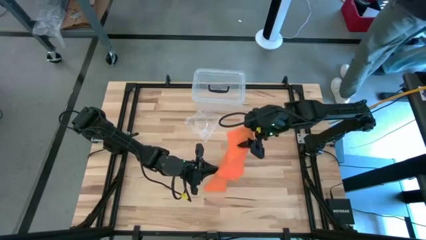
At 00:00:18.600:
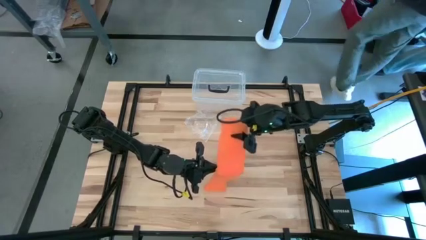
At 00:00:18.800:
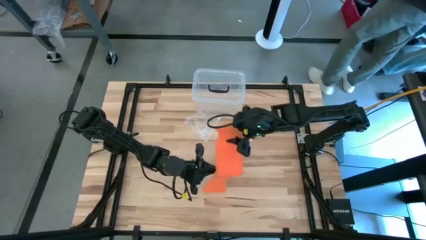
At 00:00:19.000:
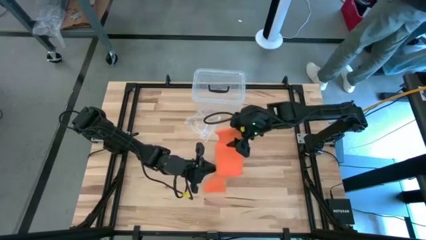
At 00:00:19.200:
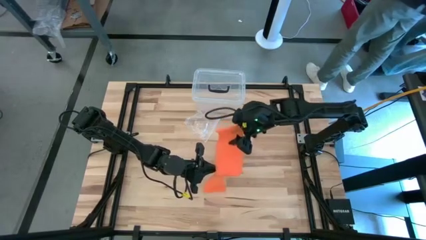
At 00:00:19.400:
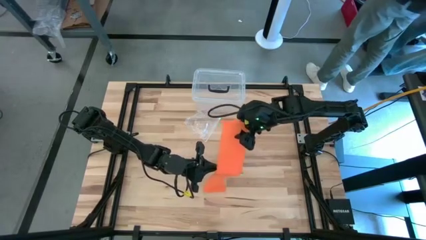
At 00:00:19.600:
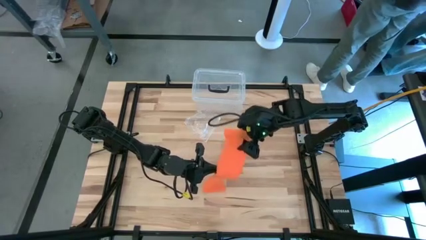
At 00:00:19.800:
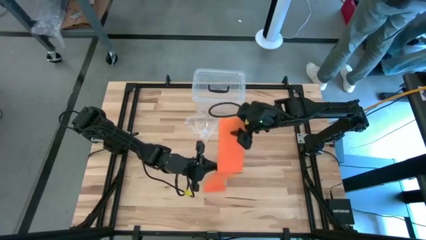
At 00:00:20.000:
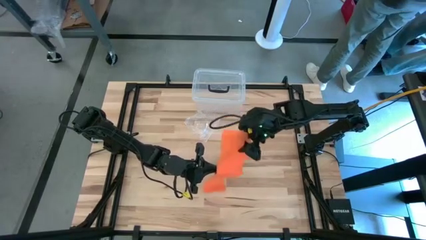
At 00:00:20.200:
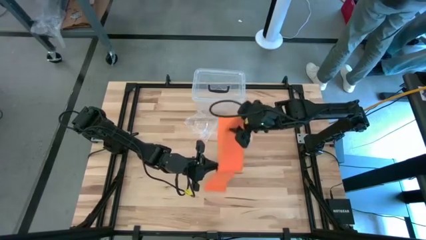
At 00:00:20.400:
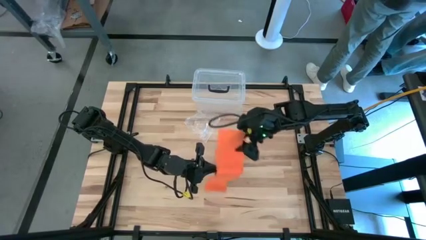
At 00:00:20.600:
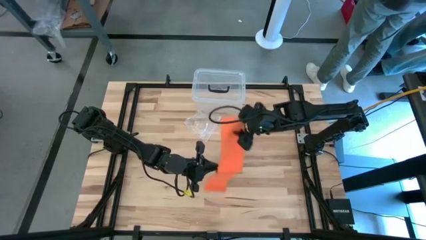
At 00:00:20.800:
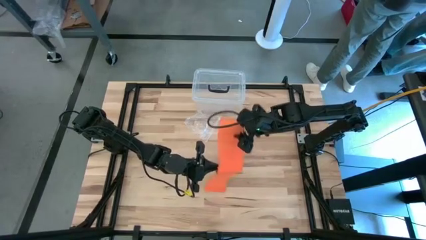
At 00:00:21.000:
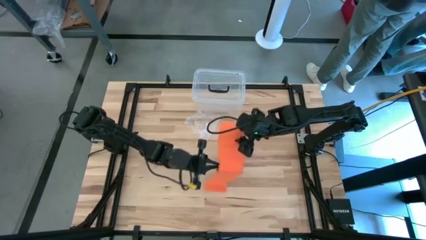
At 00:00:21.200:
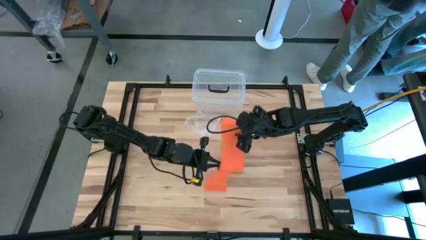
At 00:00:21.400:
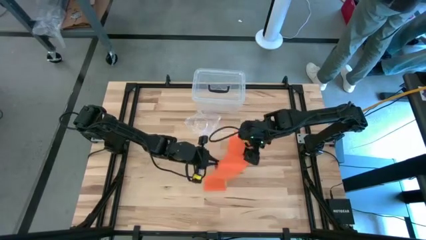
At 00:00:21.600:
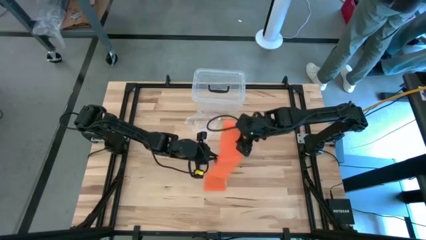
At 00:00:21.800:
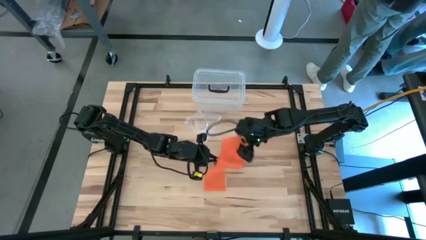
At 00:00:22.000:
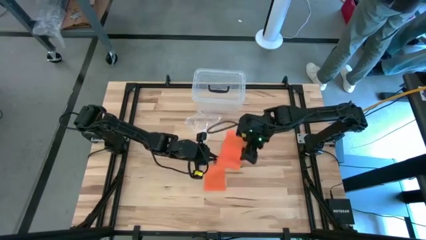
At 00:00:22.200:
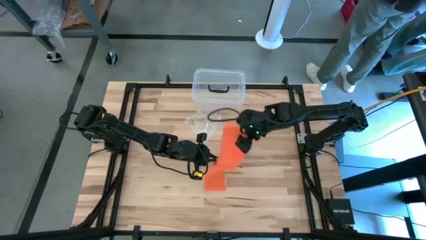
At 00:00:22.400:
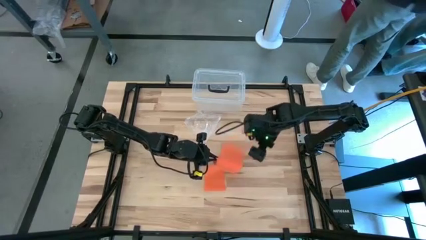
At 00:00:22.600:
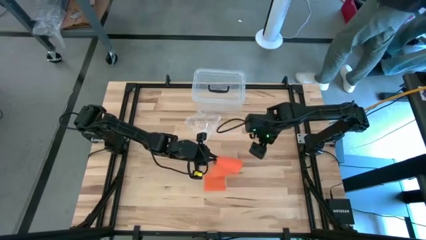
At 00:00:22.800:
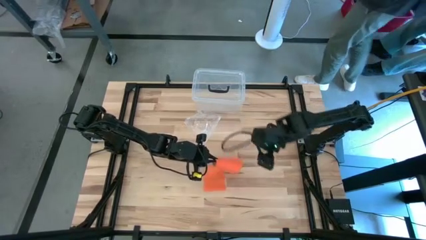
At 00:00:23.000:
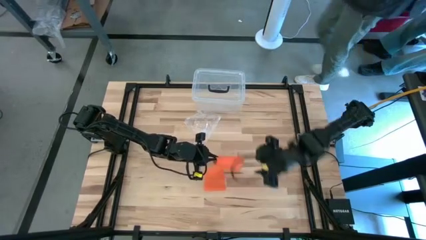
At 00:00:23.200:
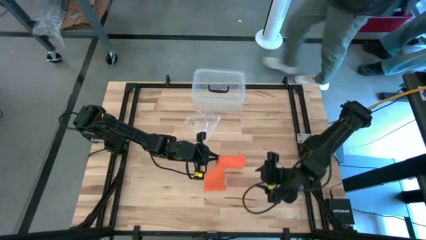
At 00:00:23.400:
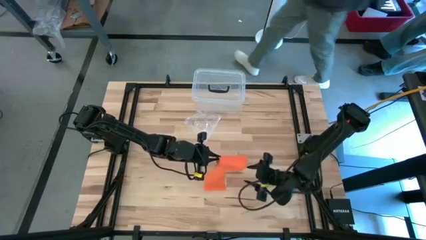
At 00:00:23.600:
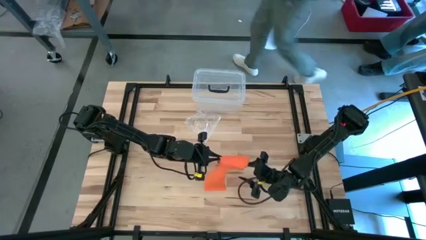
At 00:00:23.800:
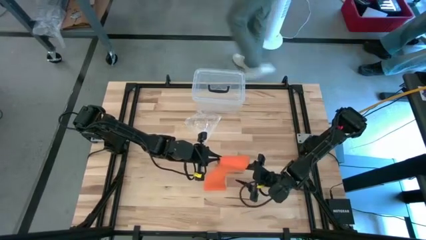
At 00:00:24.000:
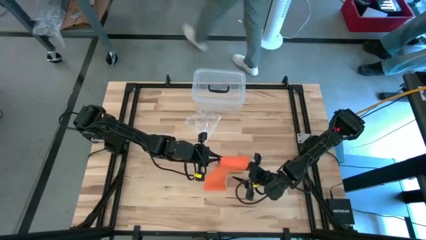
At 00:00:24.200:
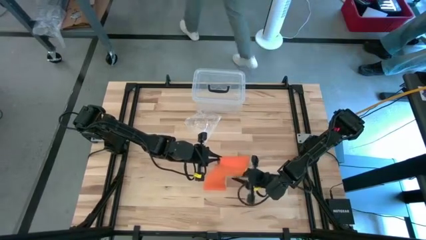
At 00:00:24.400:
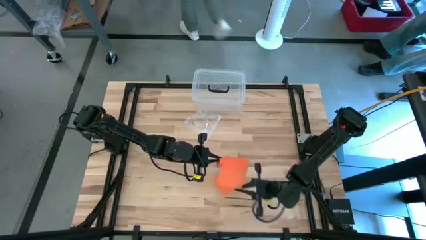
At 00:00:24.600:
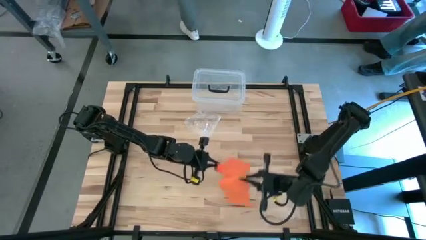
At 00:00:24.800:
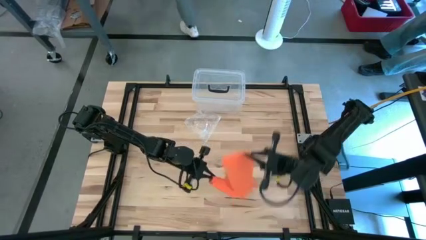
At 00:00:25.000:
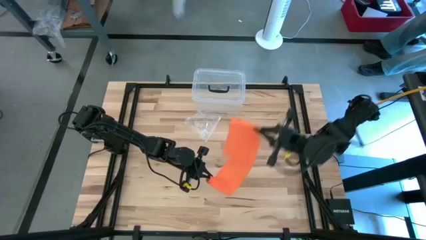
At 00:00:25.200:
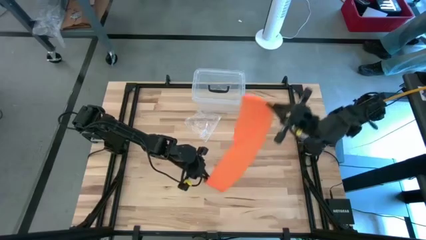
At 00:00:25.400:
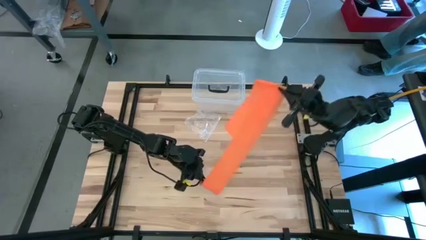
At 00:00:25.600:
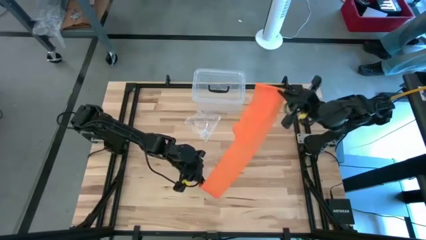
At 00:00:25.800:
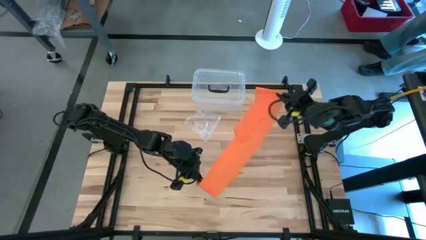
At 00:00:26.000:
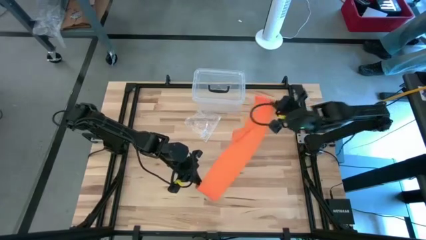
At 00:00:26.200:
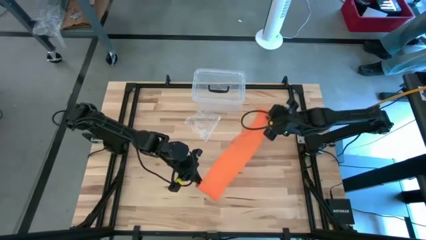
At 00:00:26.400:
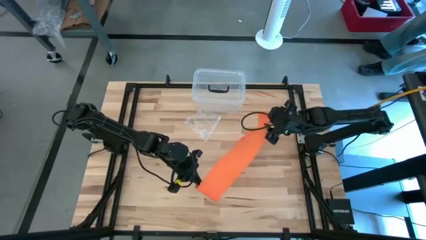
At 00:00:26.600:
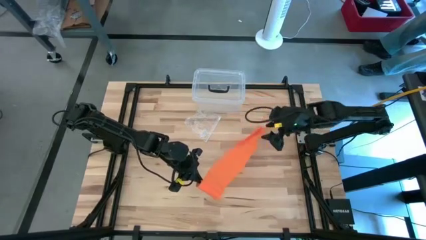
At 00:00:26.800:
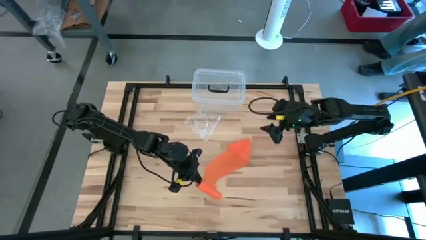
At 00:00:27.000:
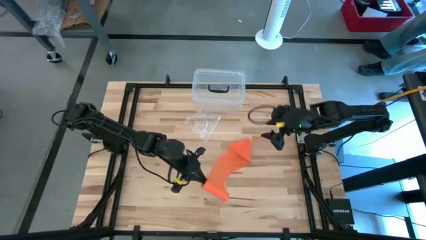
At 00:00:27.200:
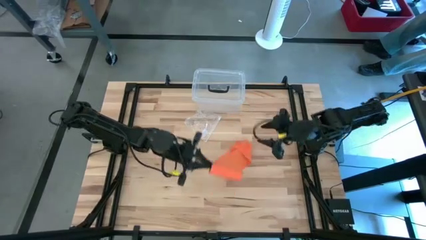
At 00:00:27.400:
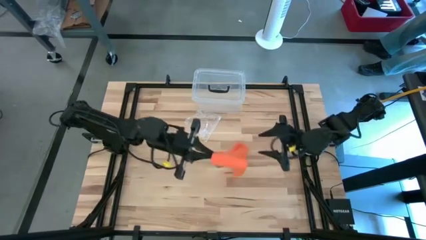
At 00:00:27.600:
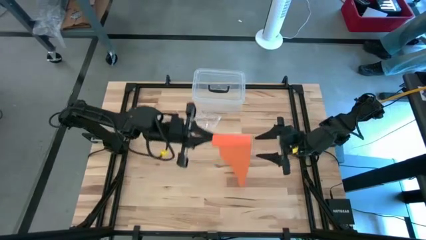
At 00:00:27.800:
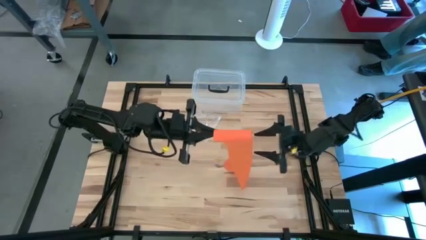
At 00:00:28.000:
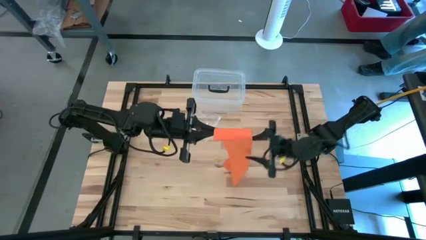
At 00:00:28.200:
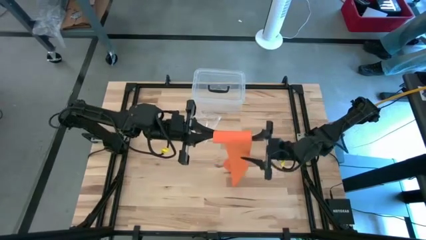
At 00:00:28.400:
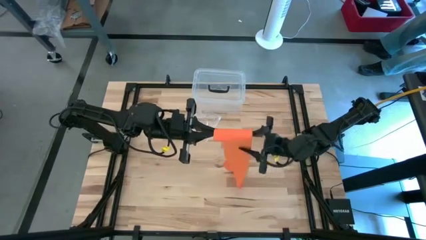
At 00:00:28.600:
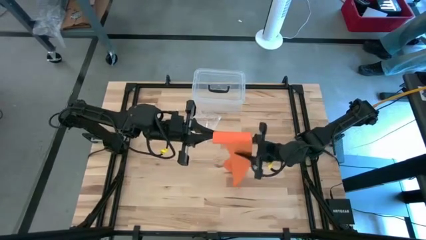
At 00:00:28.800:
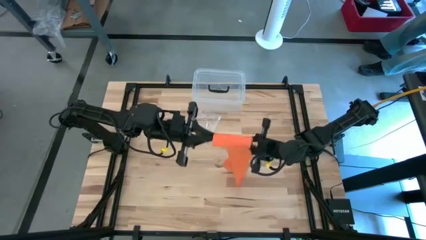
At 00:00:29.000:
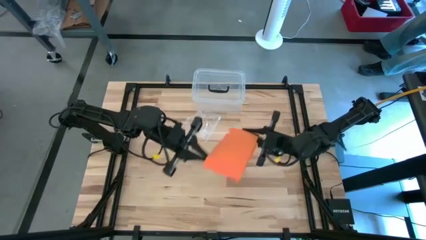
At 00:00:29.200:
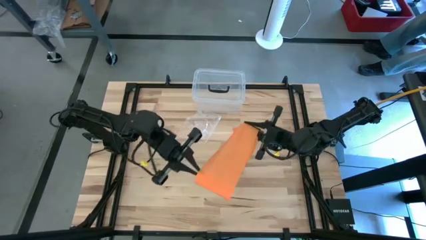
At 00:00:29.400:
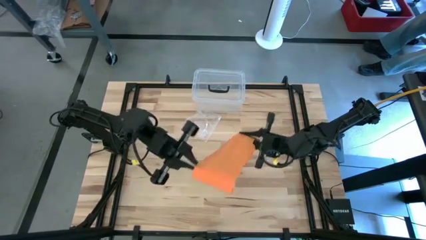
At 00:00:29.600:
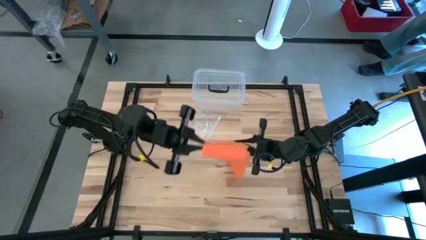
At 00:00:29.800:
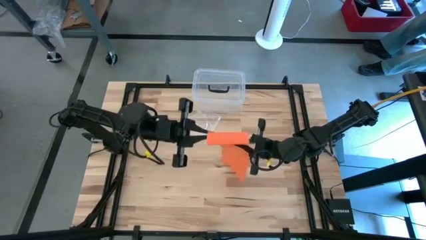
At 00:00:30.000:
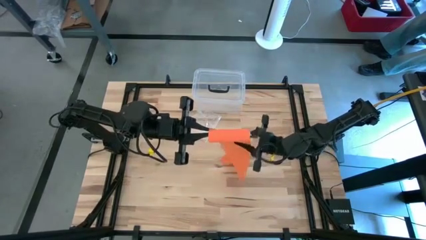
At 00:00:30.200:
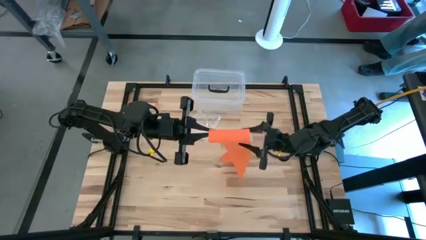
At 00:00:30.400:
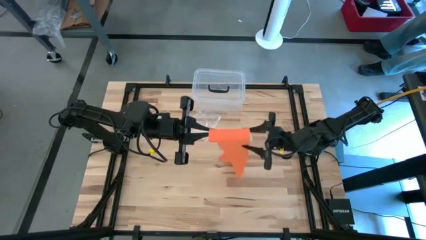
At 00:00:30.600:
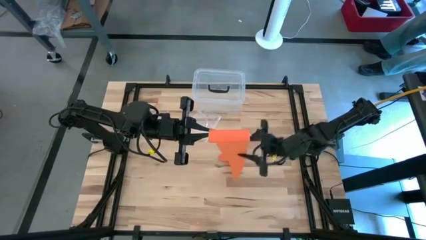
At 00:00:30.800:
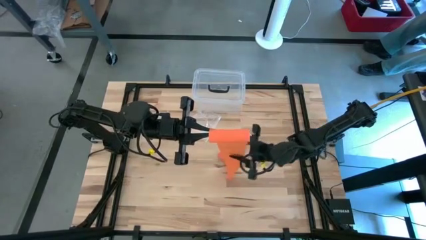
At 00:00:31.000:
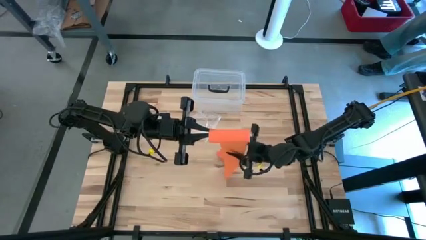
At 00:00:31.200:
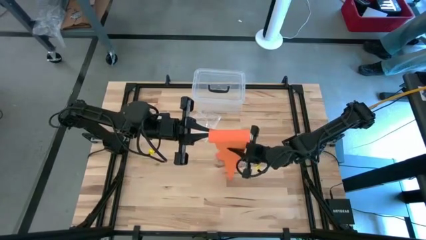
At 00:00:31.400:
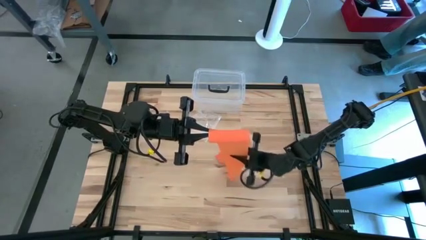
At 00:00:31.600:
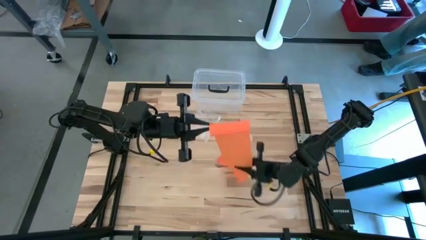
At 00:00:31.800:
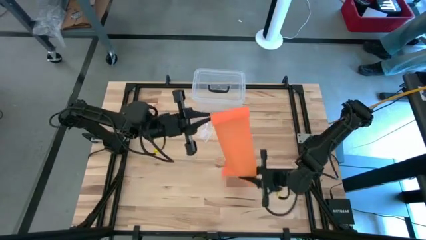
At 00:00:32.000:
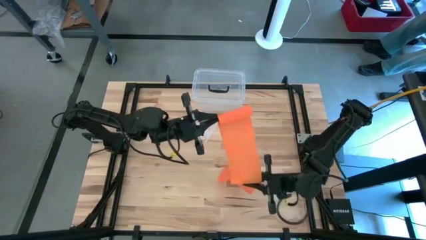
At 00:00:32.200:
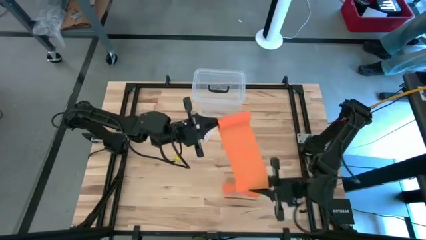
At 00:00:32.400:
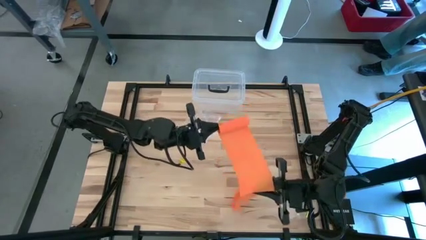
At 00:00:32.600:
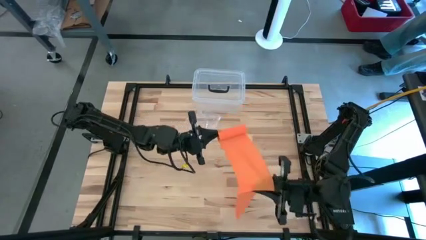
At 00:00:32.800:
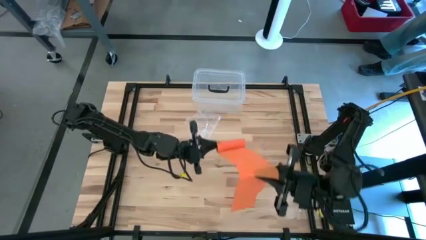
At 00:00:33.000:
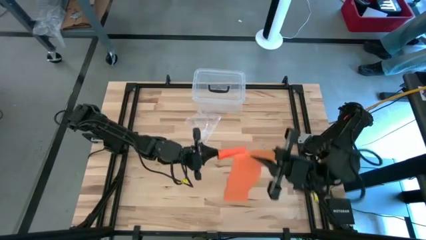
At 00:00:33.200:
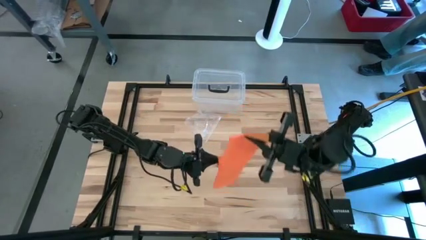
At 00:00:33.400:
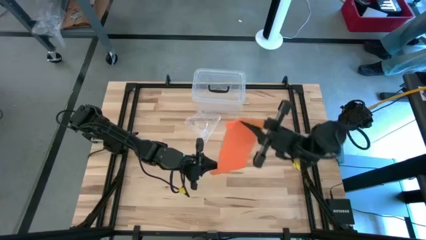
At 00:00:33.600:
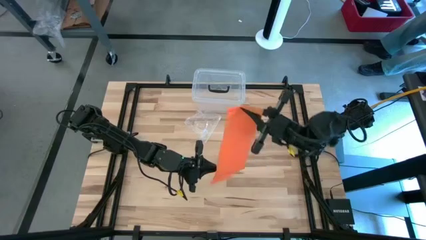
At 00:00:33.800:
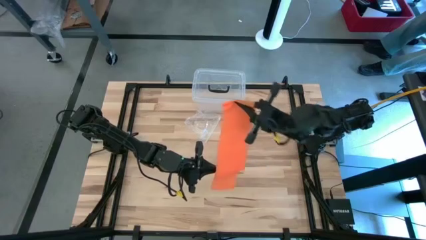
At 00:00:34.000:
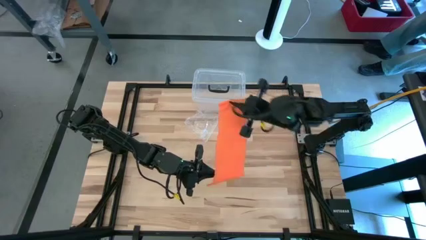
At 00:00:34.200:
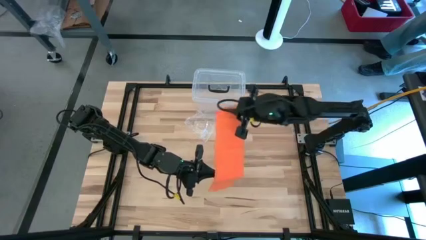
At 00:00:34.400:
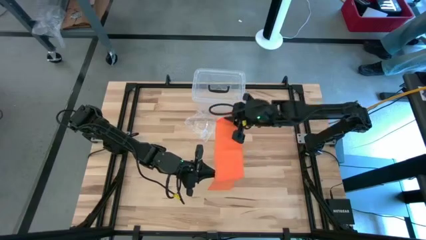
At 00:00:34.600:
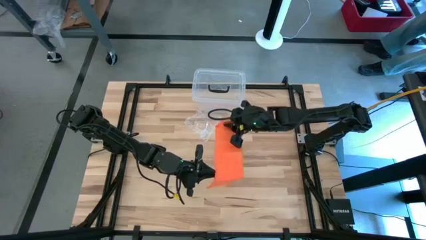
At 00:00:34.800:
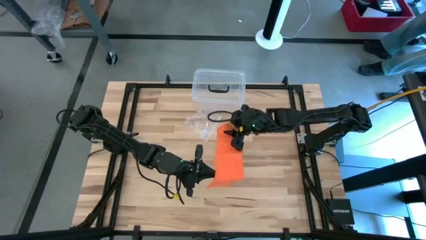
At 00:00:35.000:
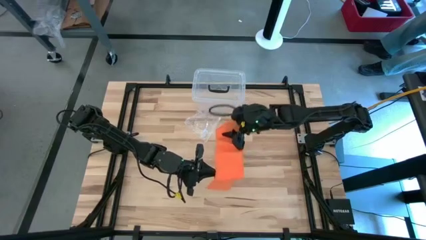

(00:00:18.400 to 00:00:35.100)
Task: Roll bandage
Roll the orange bandage
